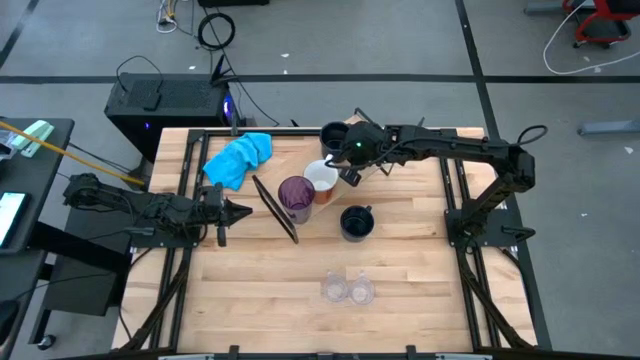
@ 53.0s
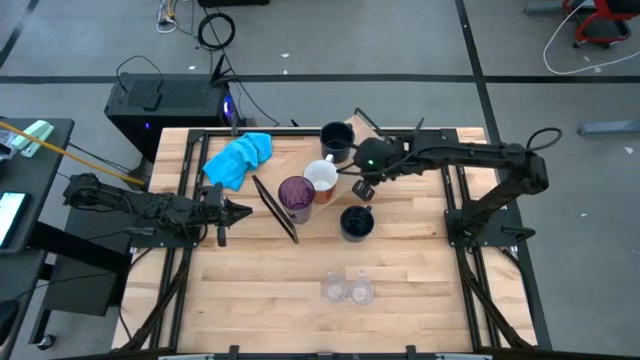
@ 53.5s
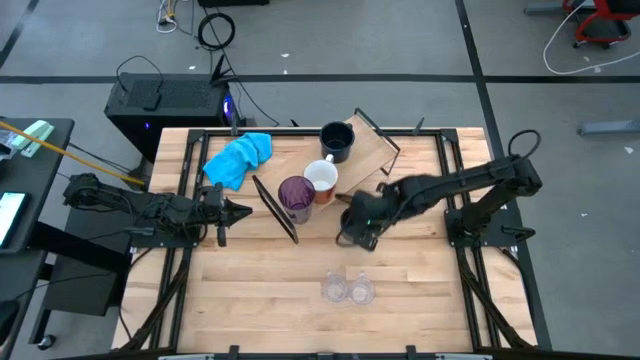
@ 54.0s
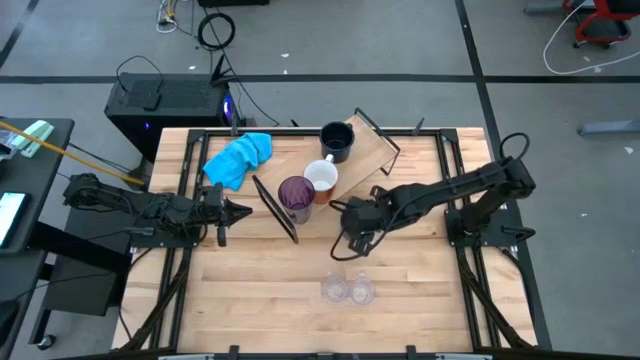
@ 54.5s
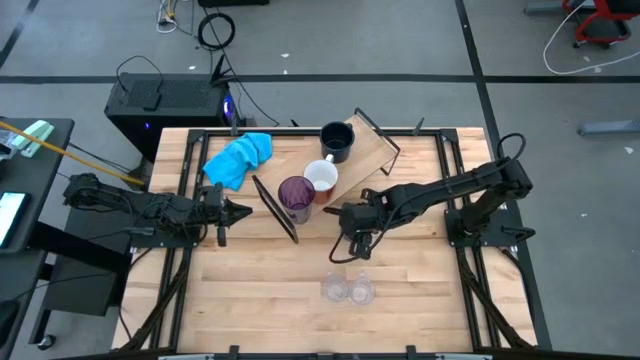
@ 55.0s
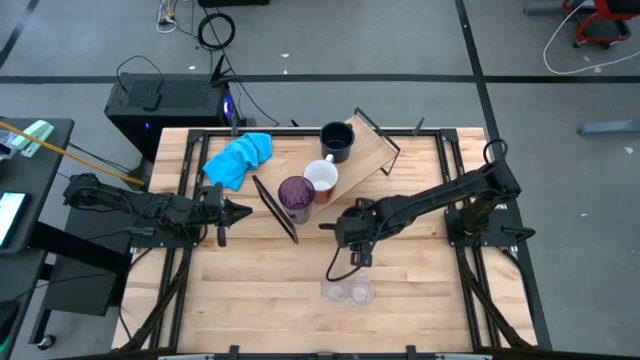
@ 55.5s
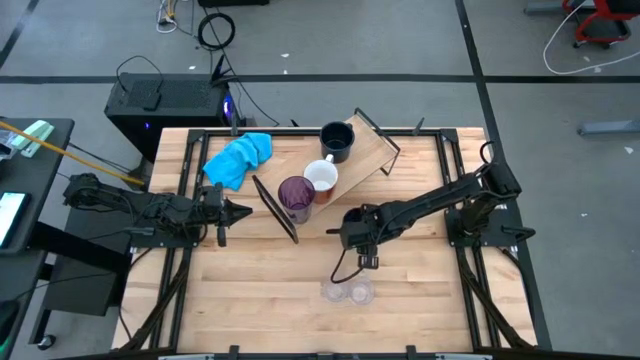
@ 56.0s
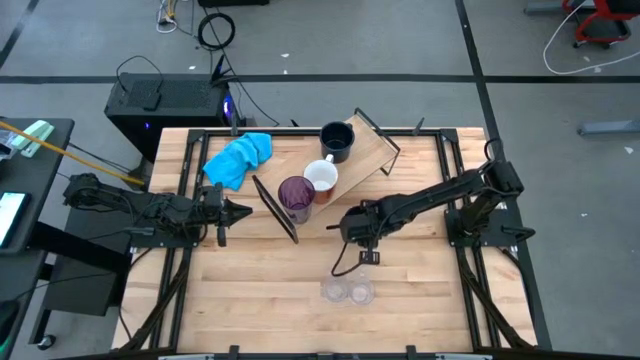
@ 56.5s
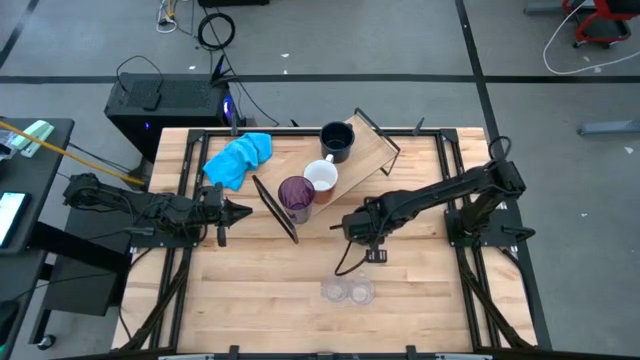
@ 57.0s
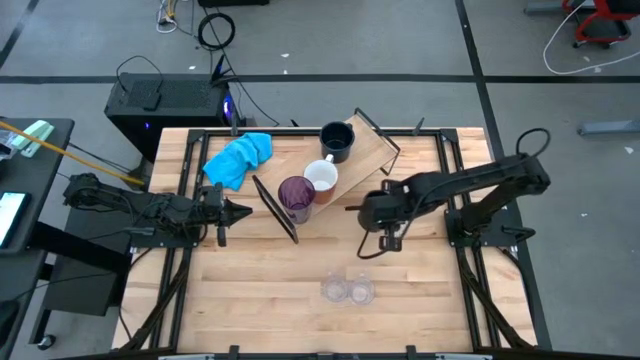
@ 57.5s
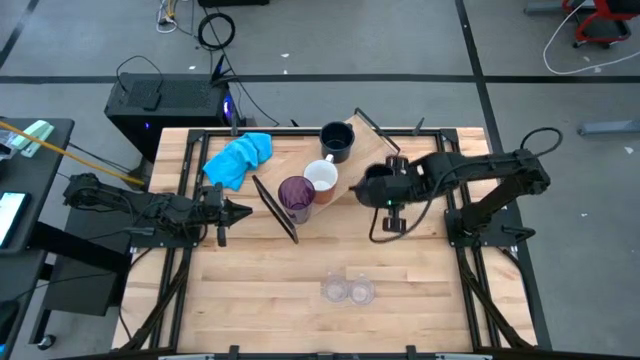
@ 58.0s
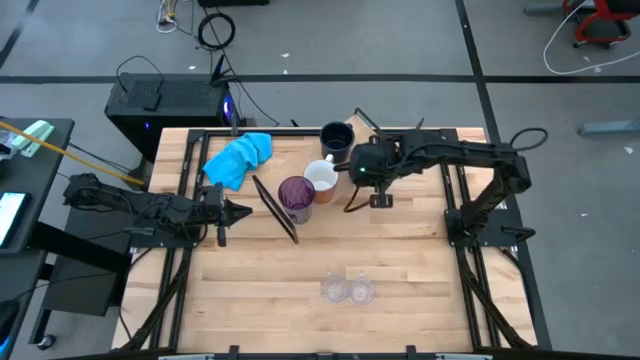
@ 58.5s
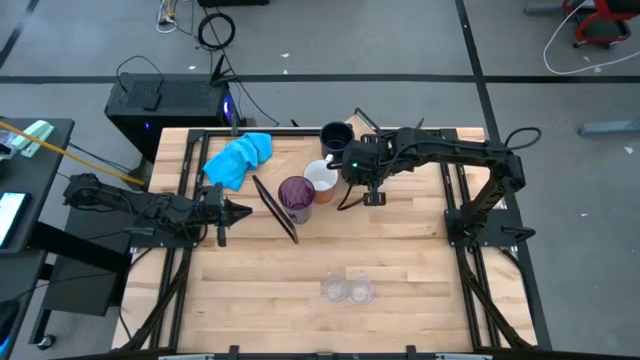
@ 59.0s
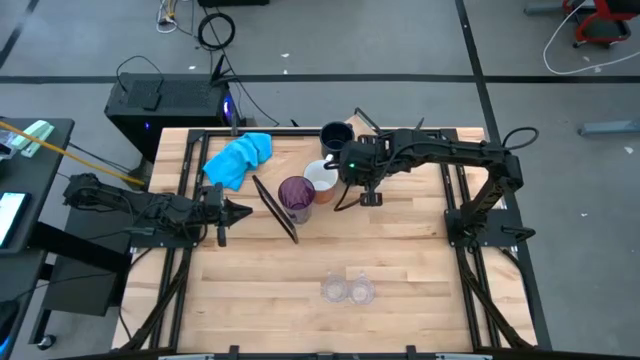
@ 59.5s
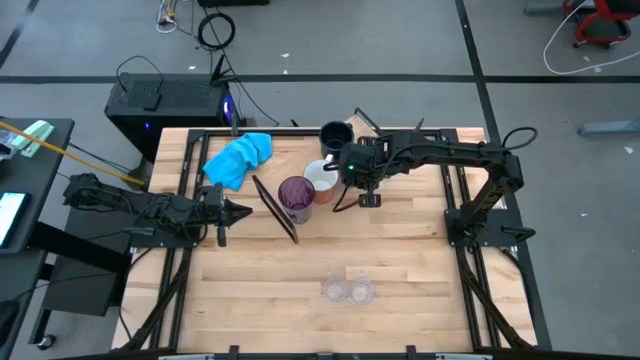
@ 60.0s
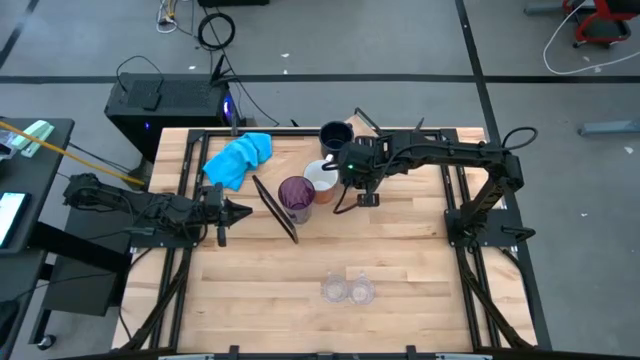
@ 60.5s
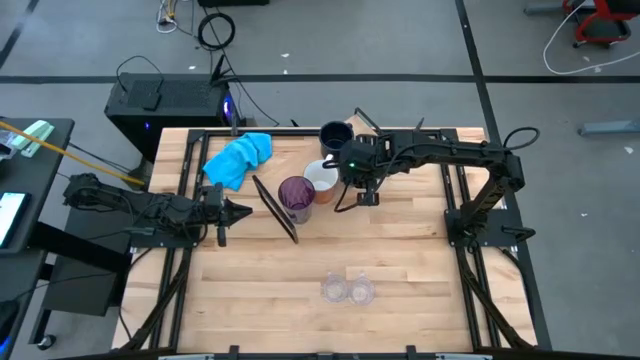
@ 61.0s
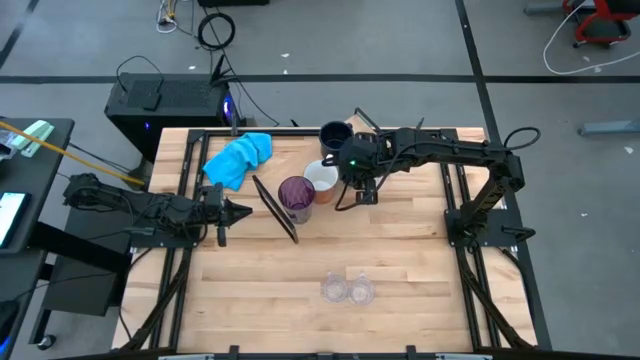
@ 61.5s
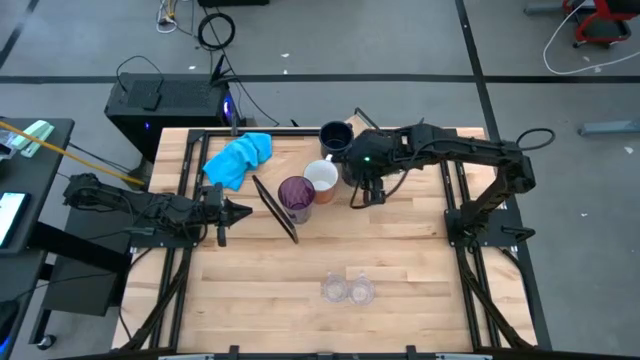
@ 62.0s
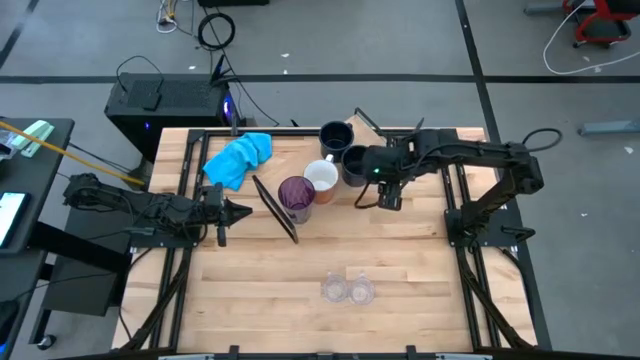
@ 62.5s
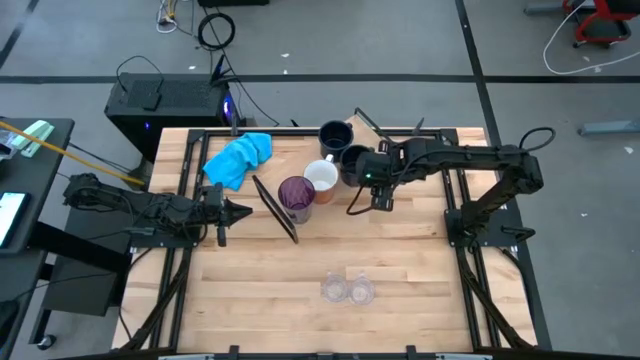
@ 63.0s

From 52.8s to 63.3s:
Task: Stack small to large cups/mugs on shelf
Put the dark blue mug on the shelf aligned with the other dark blue mug

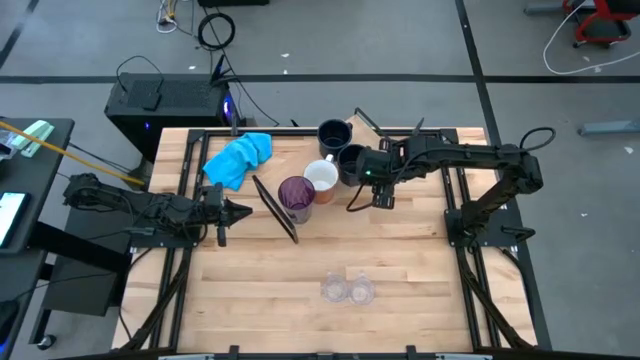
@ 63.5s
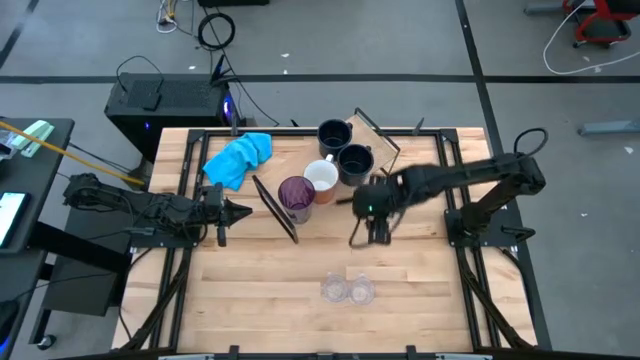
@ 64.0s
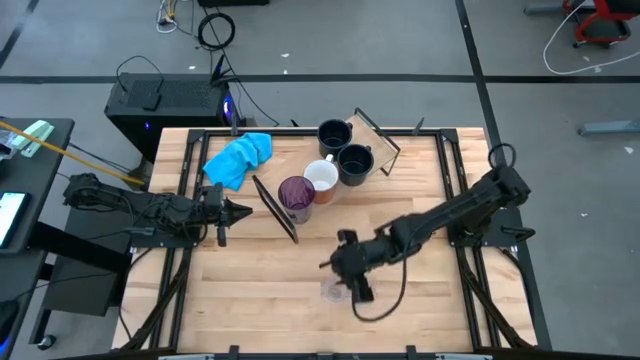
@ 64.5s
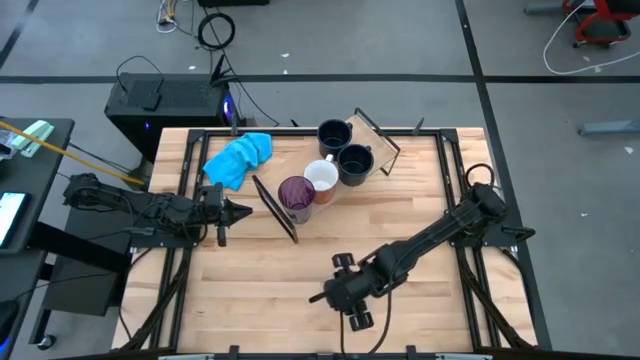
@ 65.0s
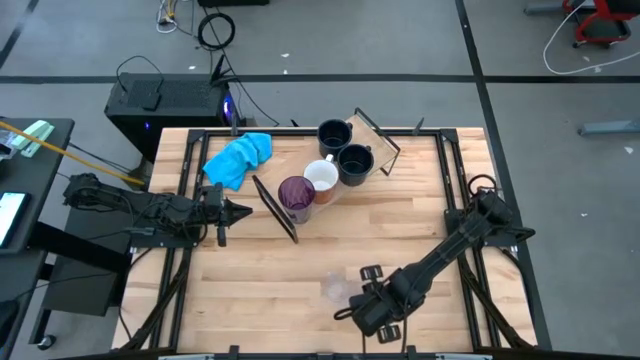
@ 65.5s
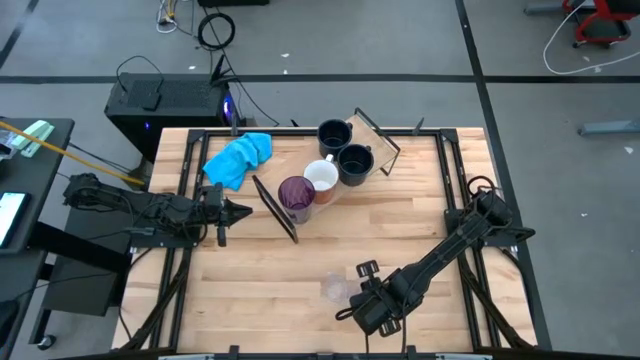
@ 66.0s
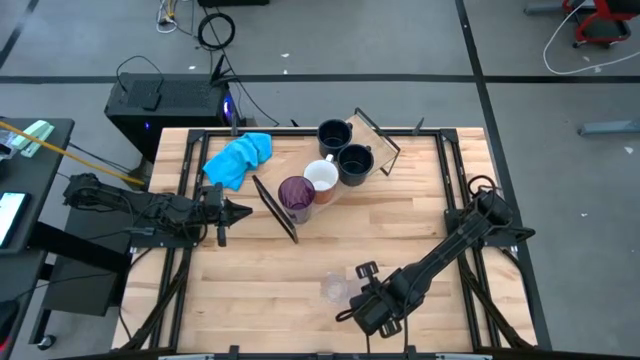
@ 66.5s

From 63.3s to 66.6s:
Put the right transparent mug on the shelf

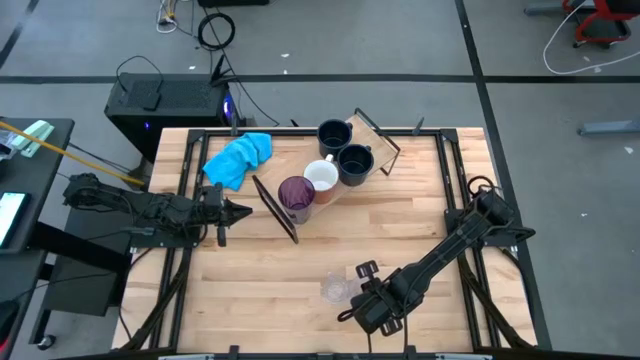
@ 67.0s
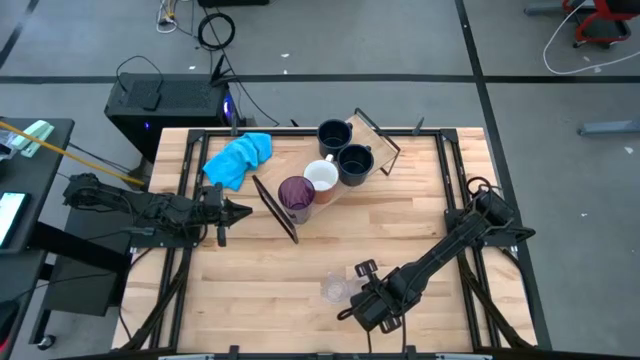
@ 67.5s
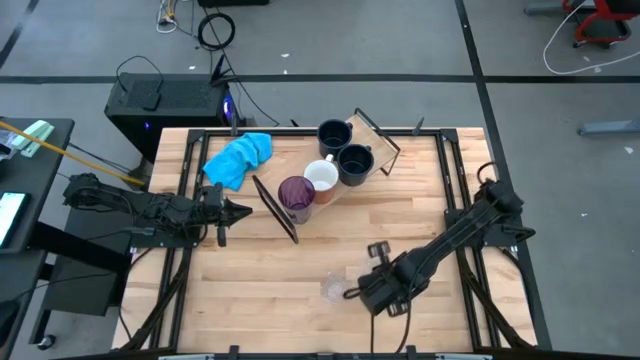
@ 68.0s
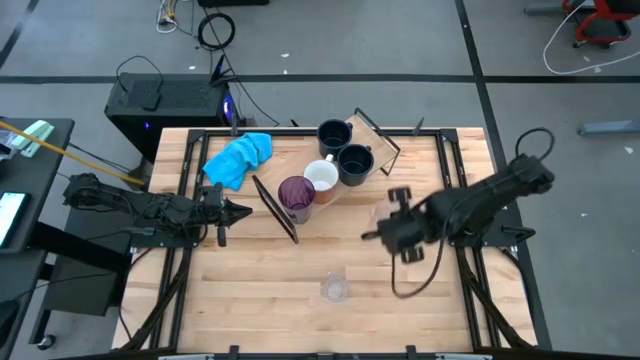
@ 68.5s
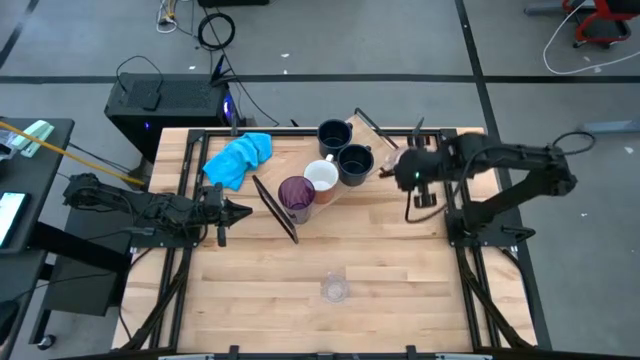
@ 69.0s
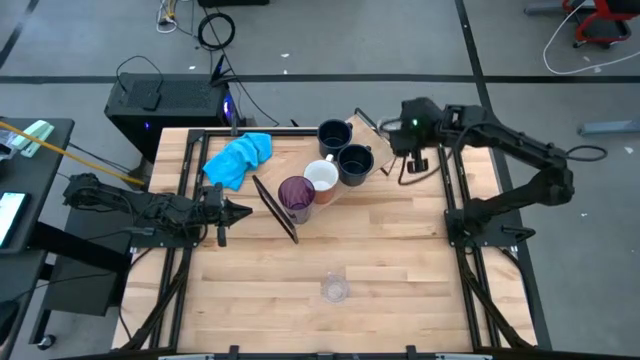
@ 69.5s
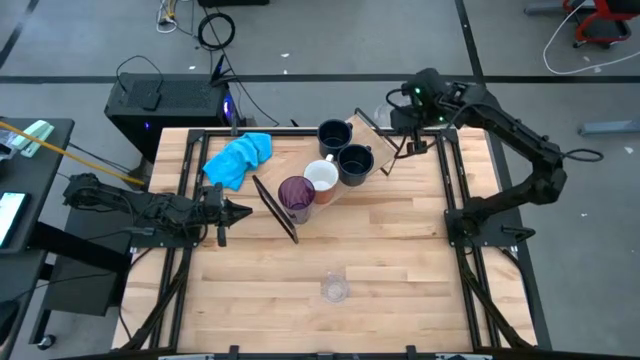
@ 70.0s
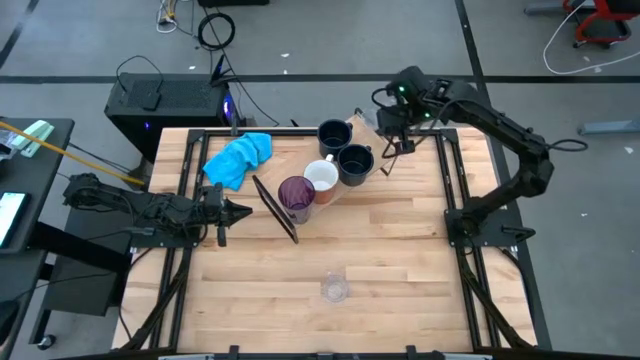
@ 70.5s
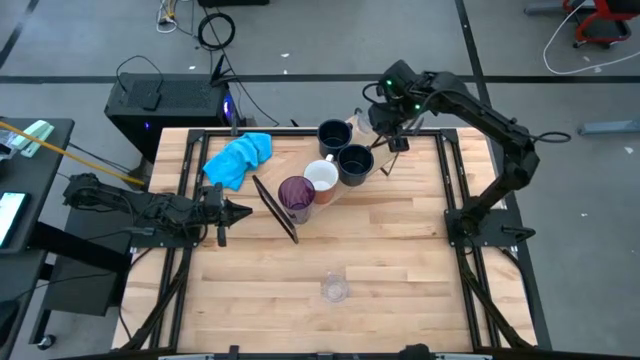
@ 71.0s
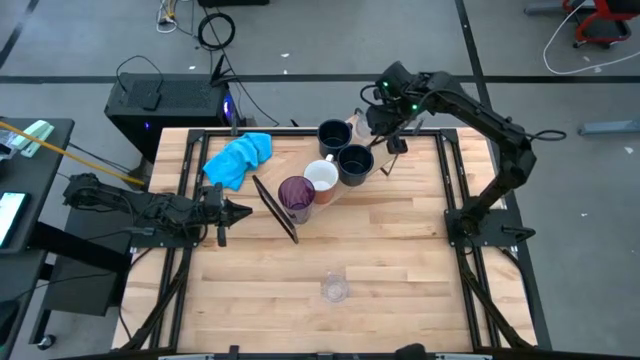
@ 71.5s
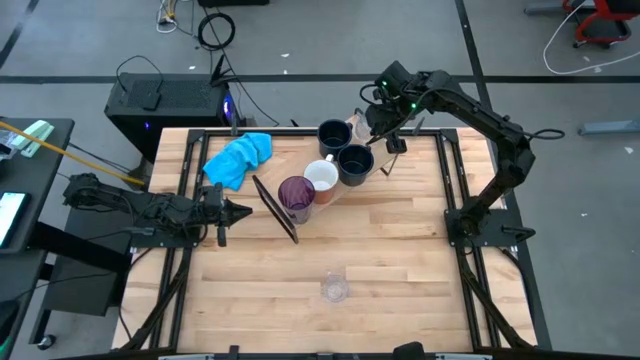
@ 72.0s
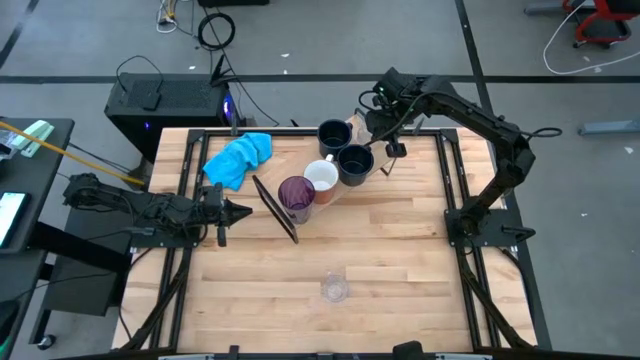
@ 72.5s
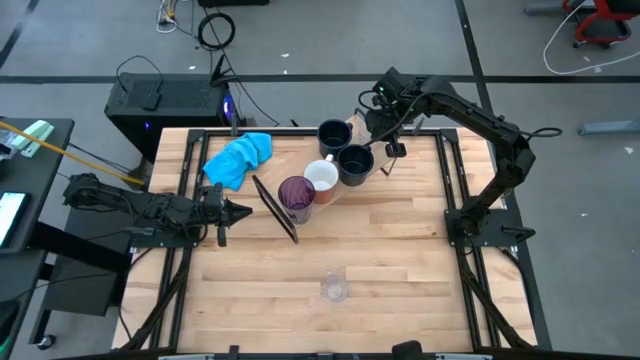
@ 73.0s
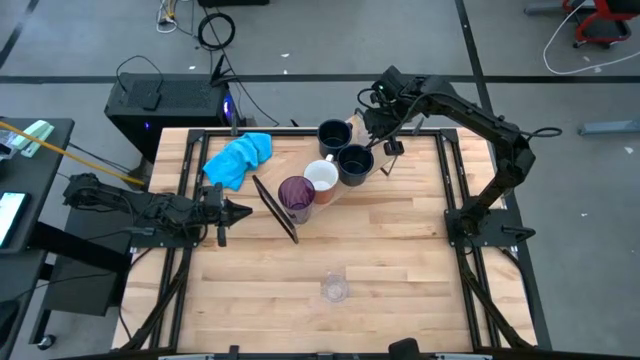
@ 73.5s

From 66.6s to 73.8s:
Put the right transparent mug on the shelf

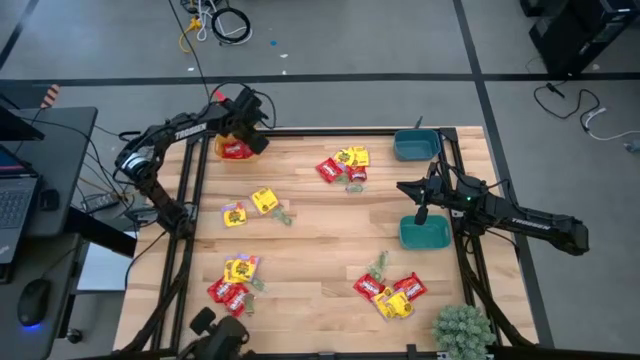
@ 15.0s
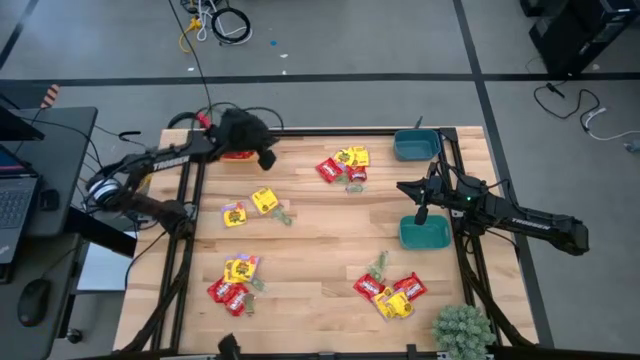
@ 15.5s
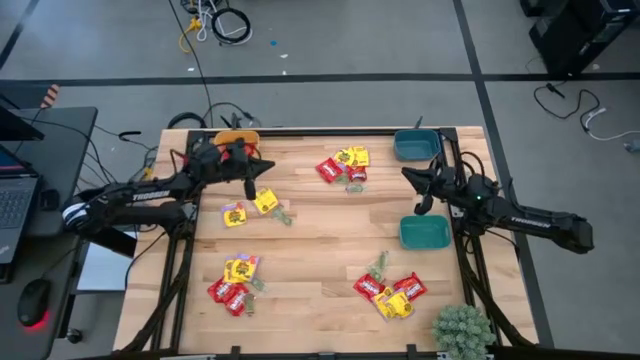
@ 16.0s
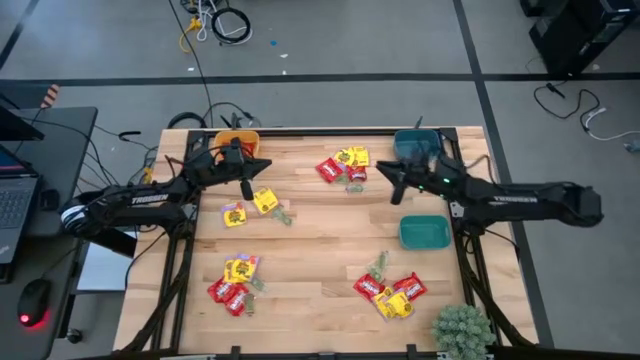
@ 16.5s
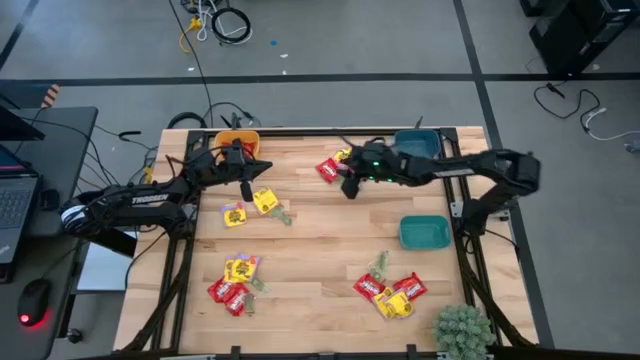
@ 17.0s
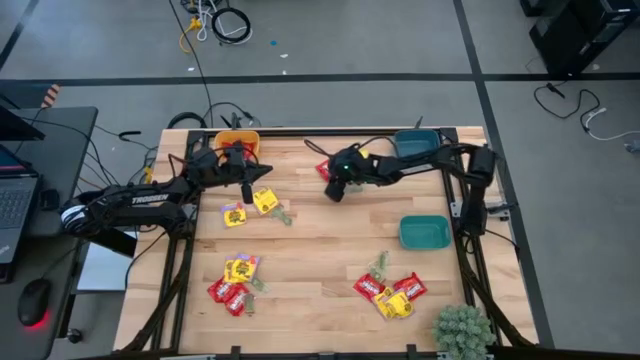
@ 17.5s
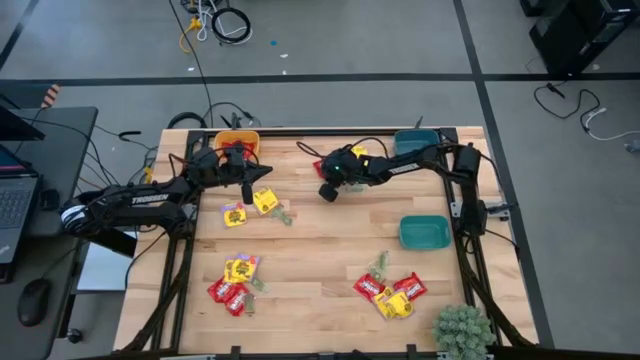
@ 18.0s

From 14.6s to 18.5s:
Task: Sort candy
Put the red candy into the yellow bin
